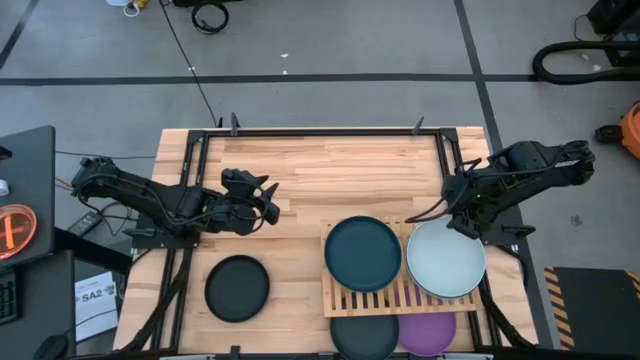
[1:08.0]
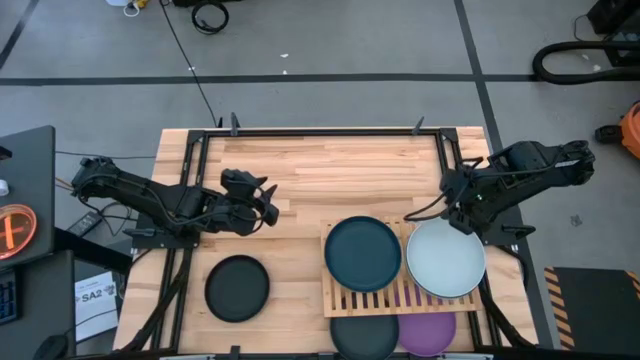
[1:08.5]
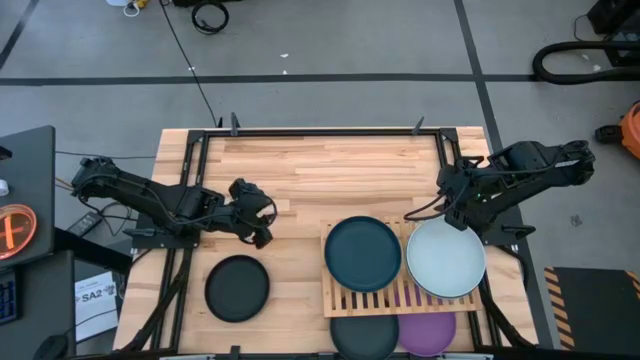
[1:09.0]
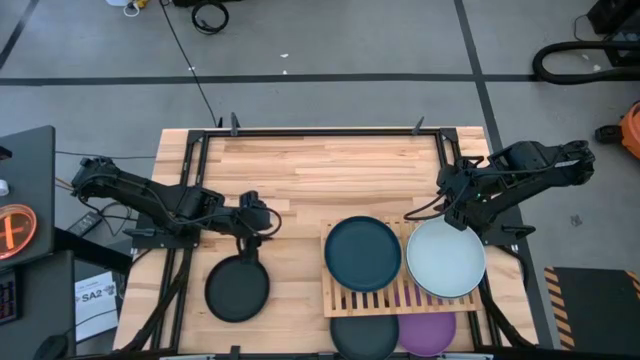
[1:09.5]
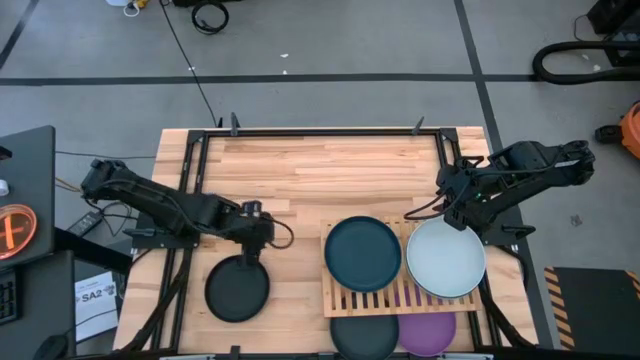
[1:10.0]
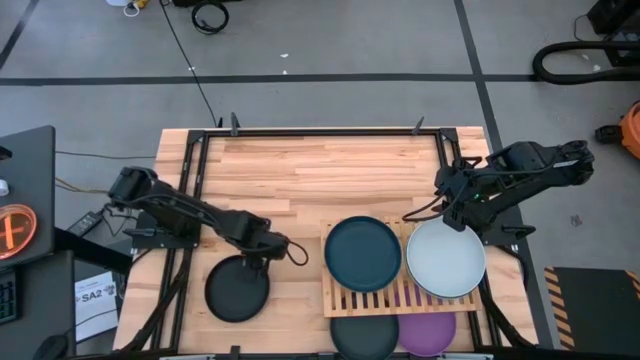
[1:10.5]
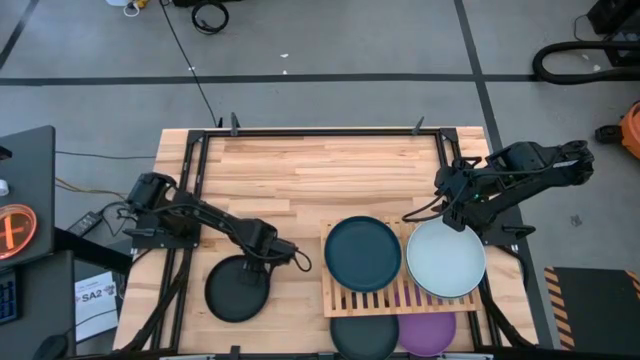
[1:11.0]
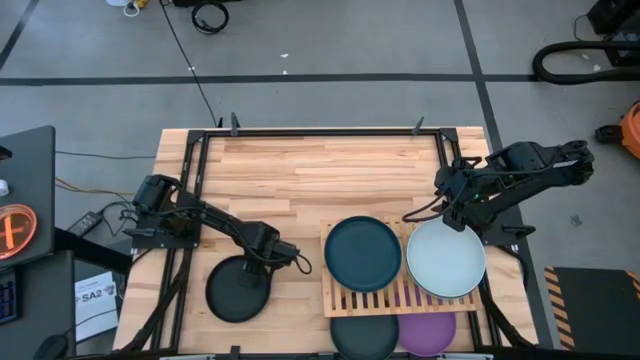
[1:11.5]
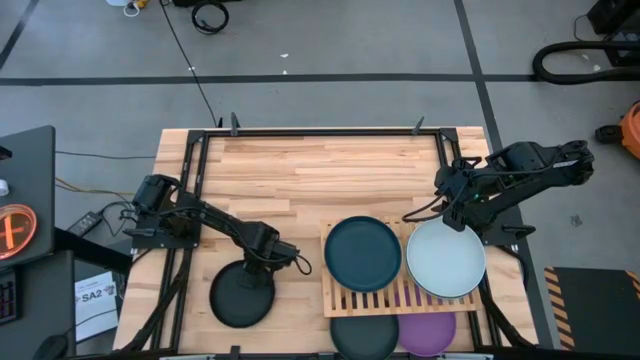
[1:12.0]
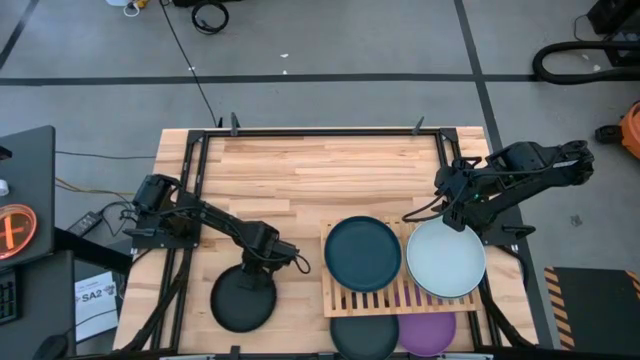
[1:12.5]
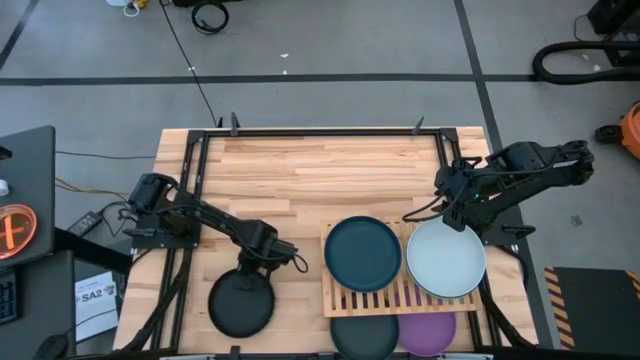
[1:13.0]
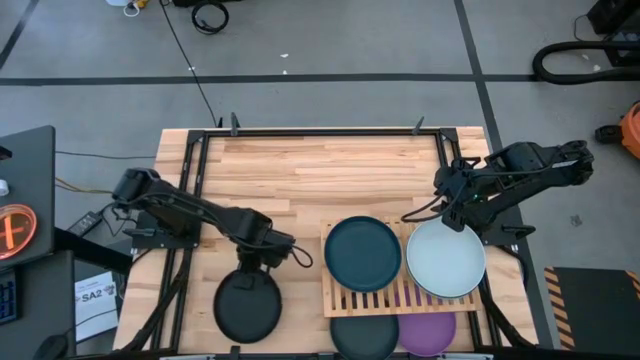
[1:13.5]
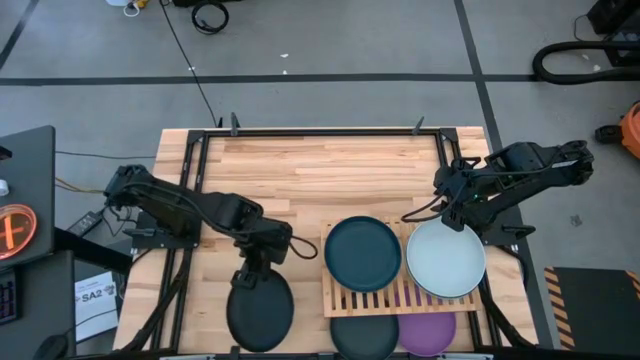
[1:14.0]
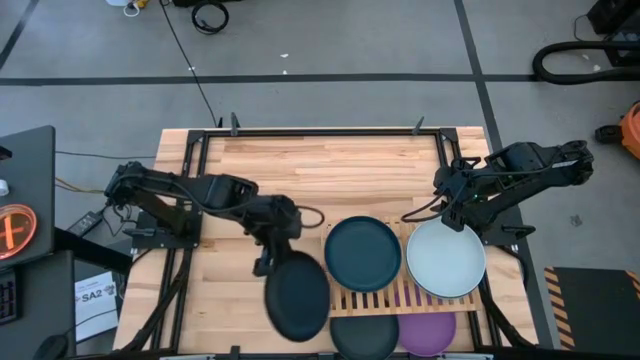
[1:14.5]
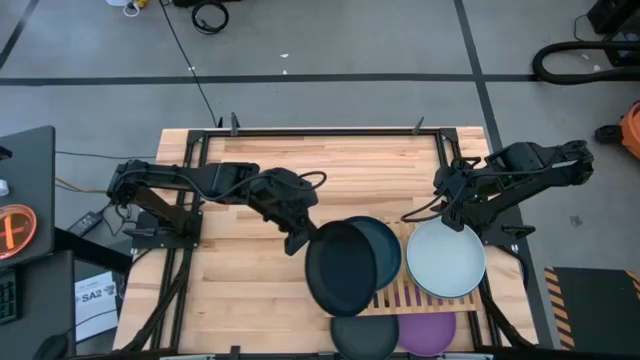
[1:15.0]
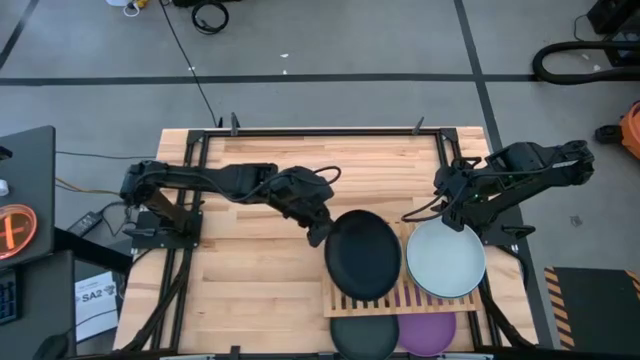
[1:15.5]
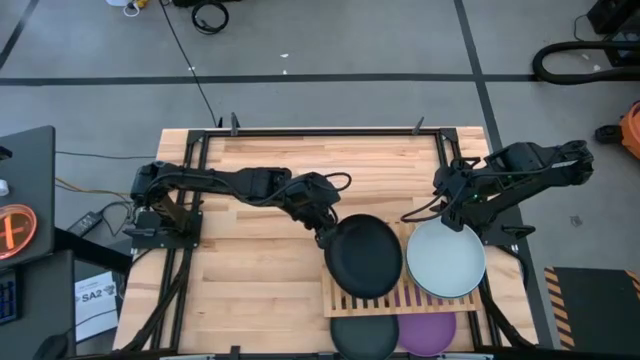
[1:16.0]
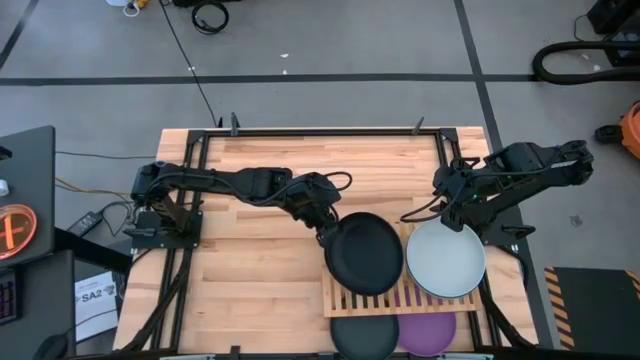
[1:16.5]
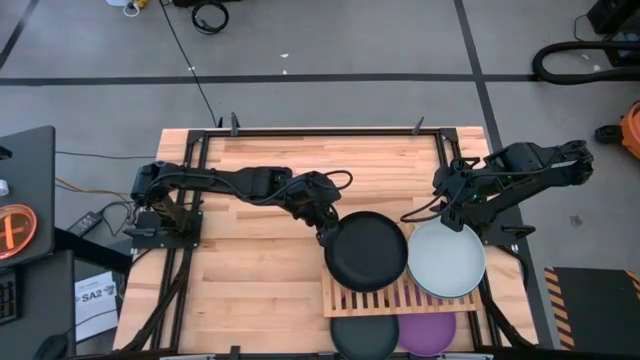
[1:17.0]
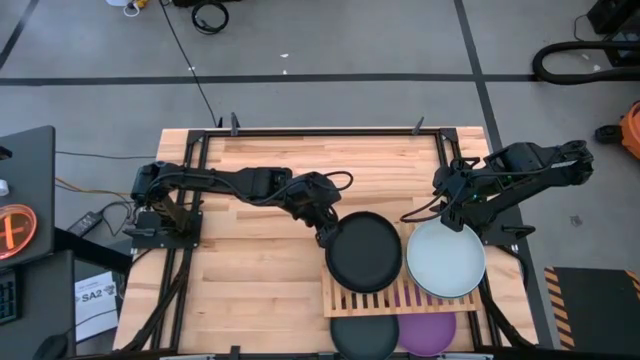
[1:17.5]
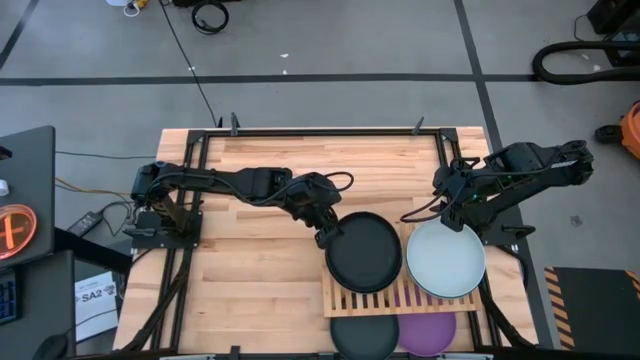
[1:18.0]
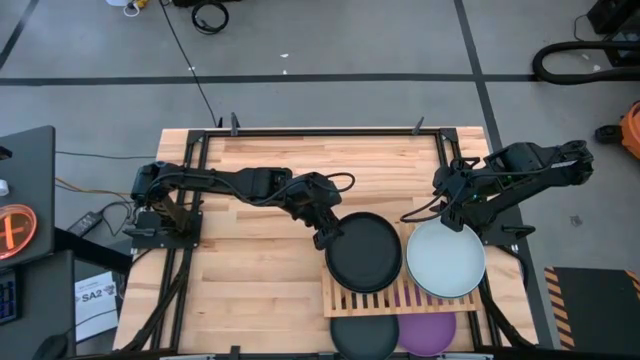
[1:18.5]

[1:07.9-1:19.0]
Task: Place and stack plates onto a shelf
Stack the left black plate on top of the dark blue plate

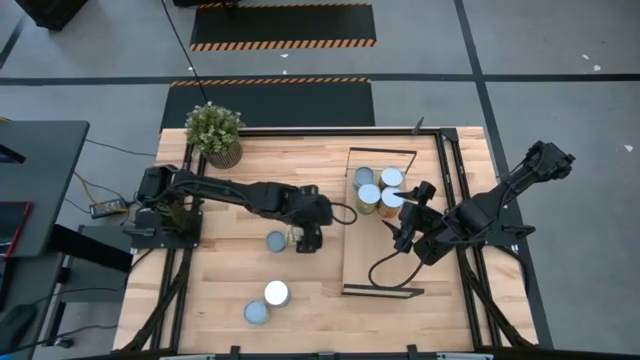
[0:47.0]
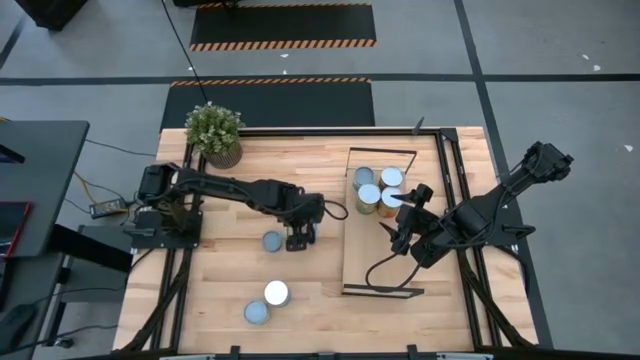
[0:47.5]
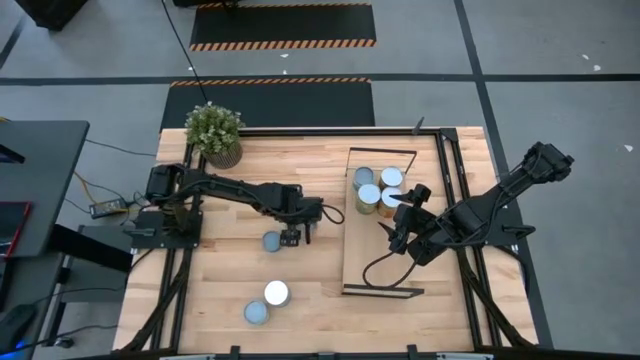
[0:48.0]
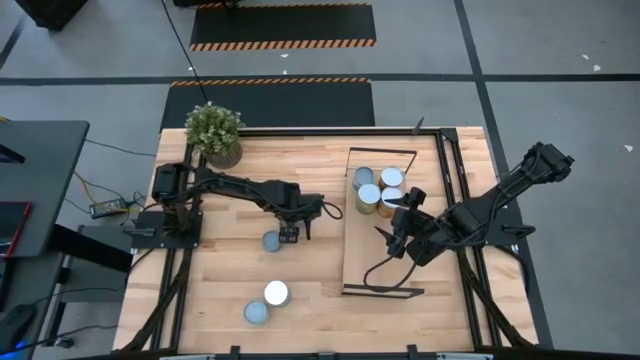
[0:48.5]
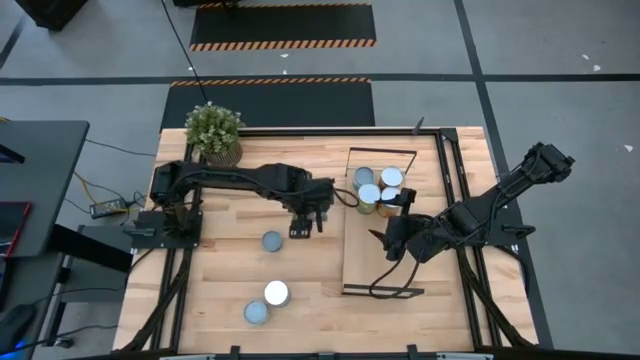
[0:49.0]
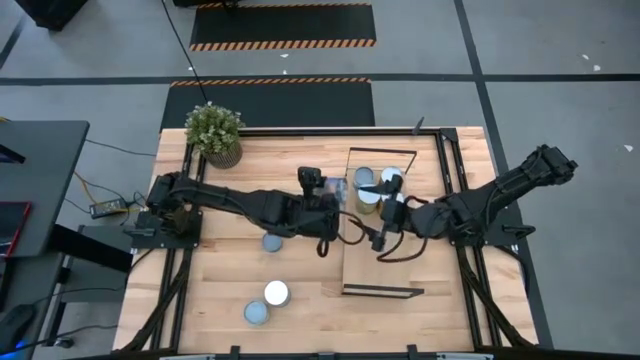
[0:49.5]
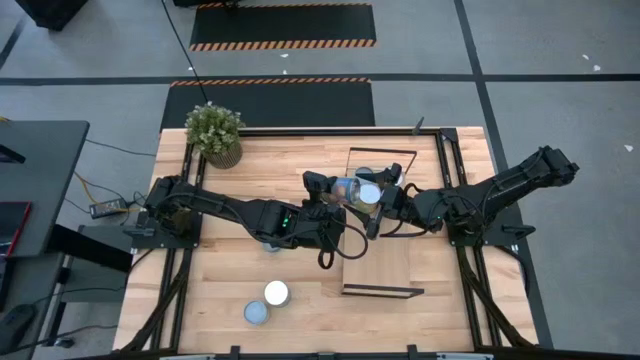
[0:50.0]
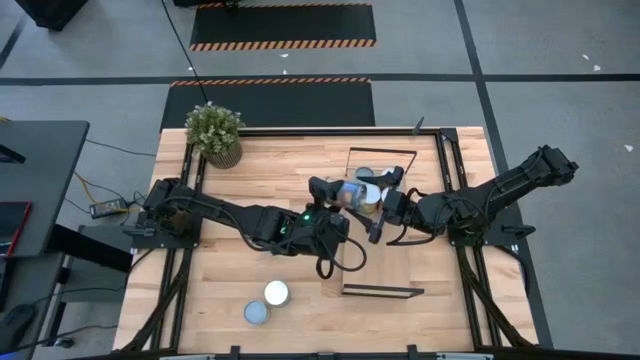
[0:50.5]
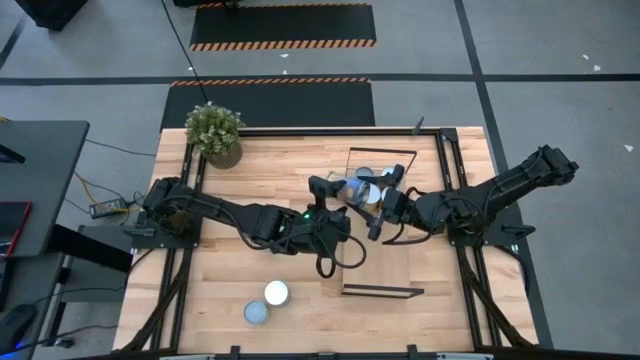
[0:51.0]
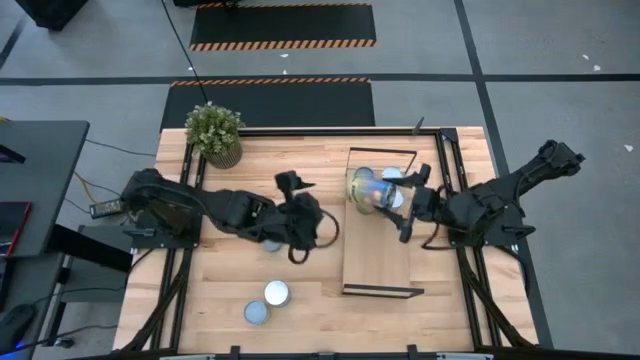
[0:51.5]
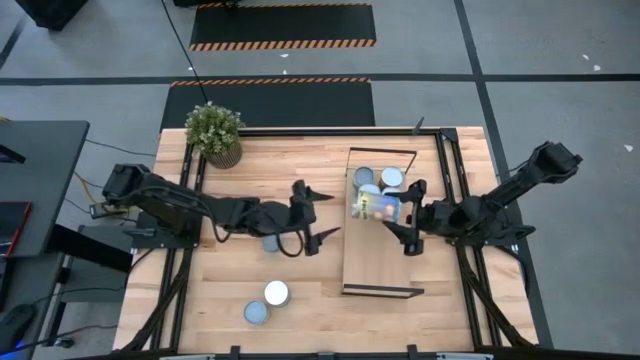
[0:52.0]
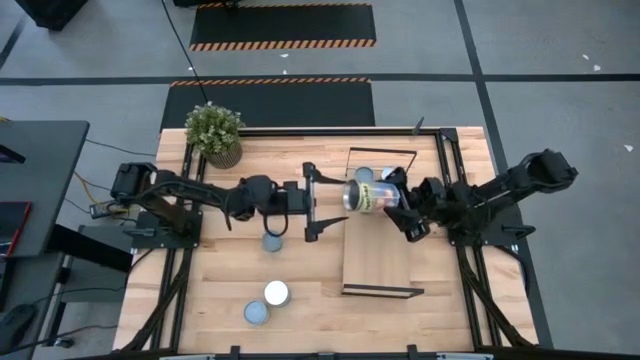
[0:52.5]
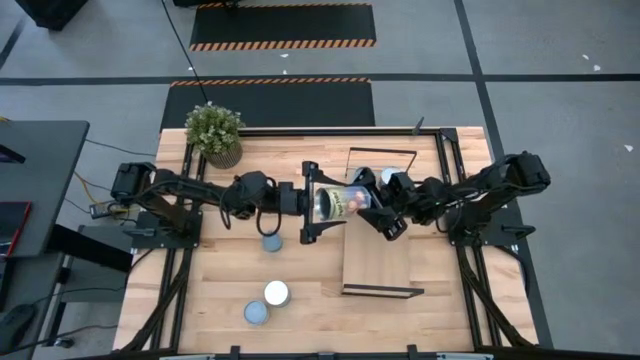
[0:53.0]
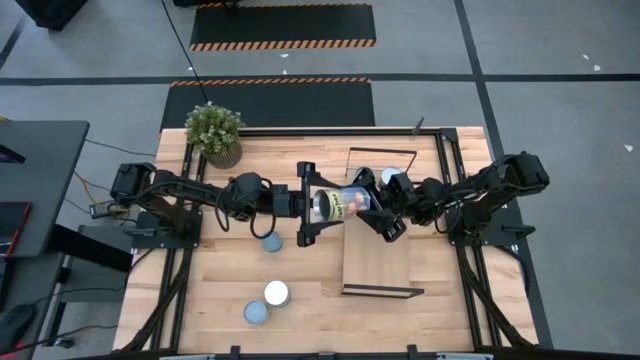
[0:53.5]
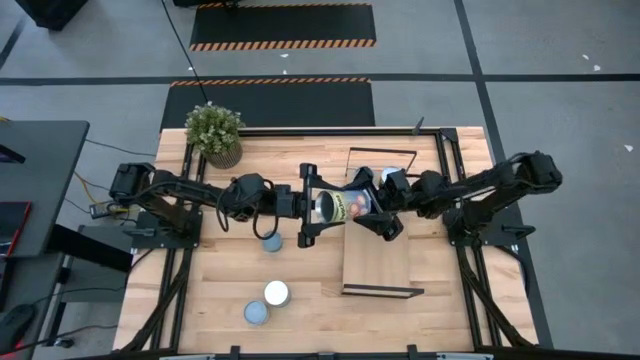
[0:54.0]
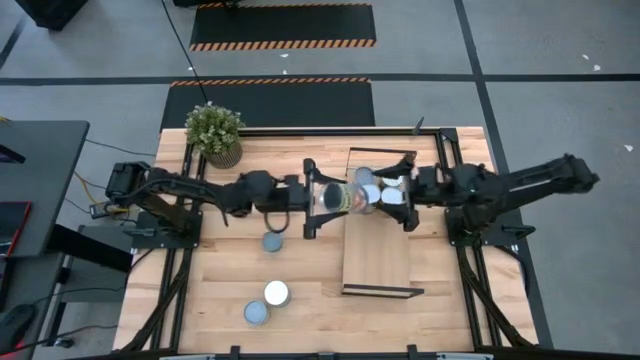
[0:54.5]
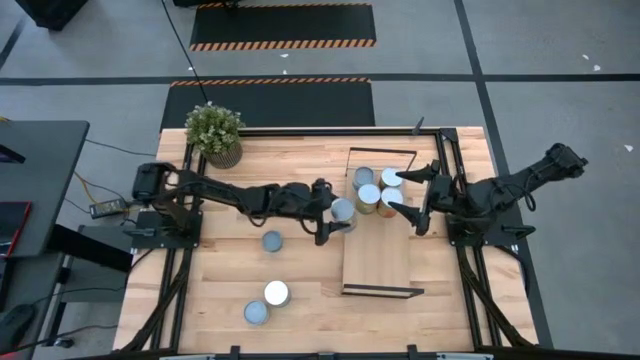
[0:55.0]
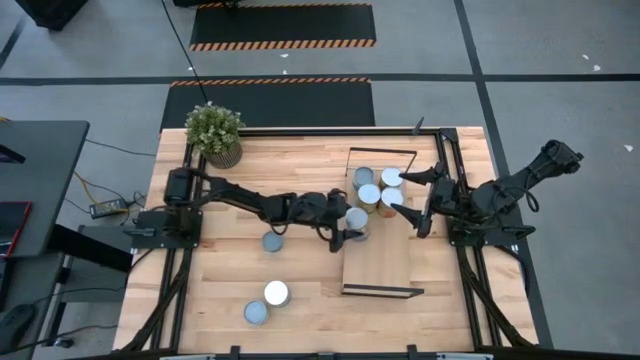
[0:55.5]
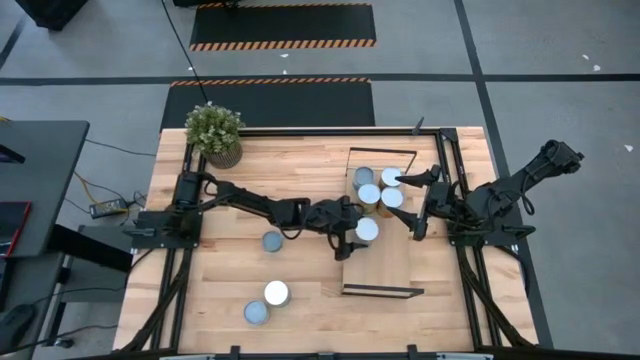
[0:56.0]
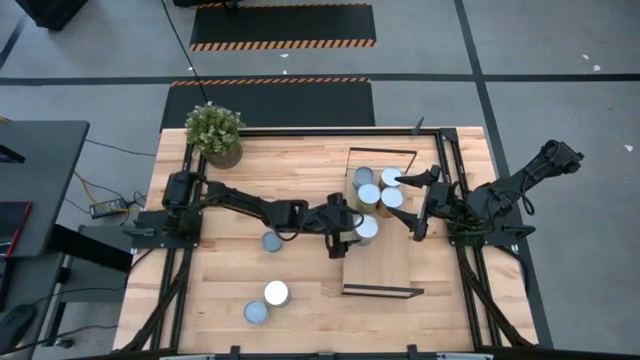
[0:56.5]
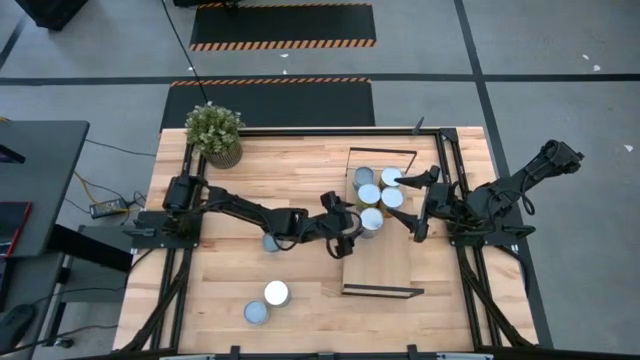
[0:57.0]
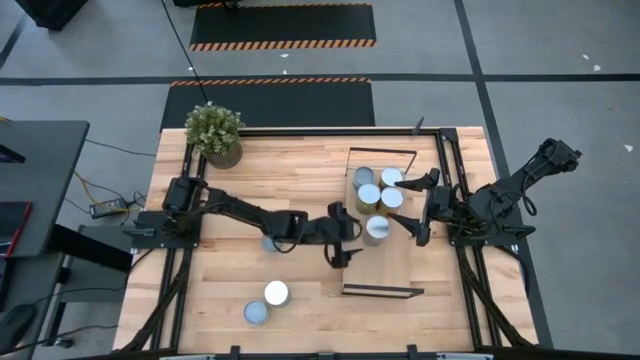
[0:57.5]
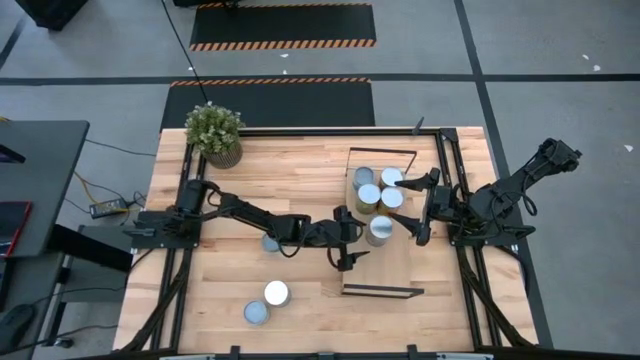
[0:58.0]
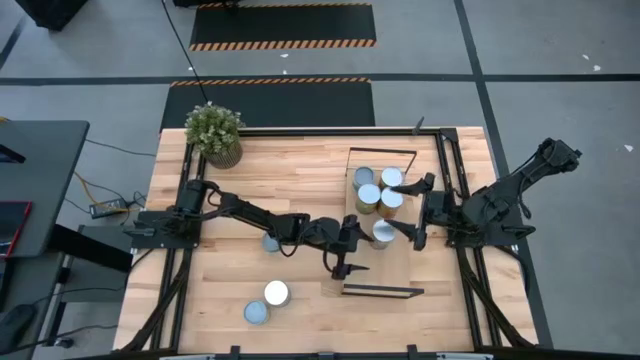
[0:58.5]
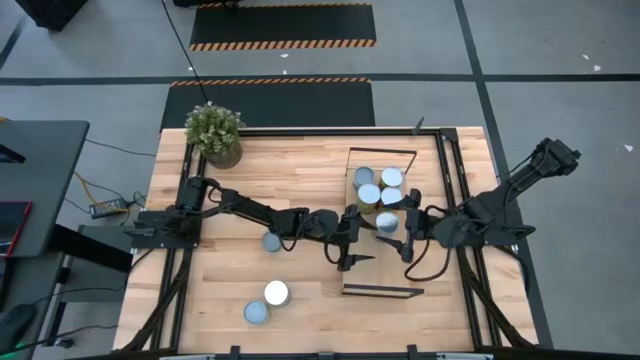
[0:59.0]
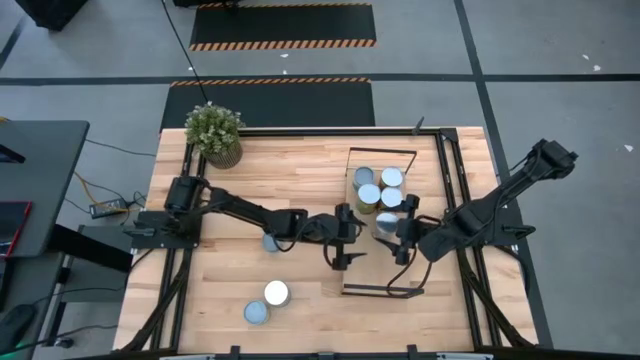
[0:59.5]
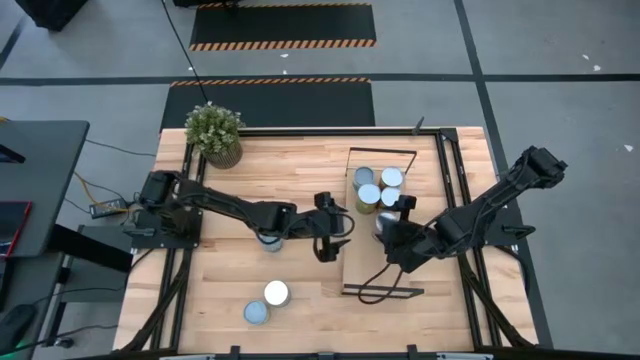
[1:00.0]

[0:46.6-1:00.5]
Task: Pick and place cans onto a shelf
Put the canned peaches on the shelf
